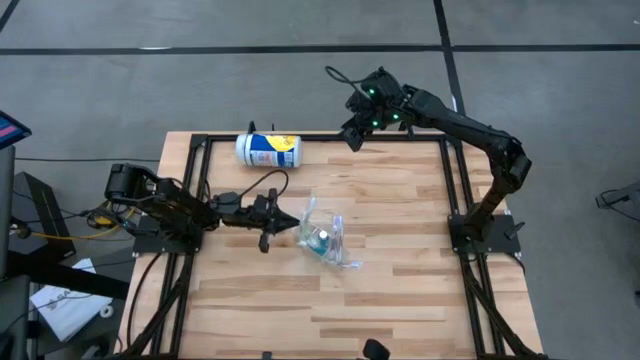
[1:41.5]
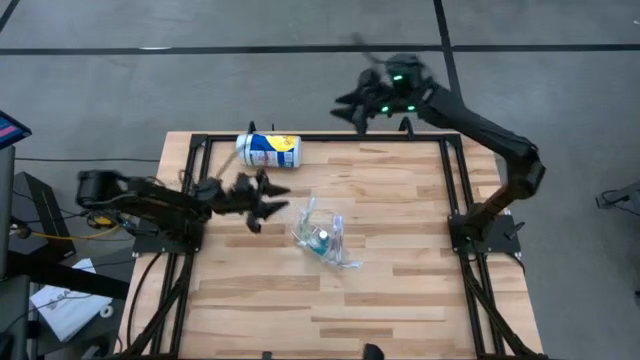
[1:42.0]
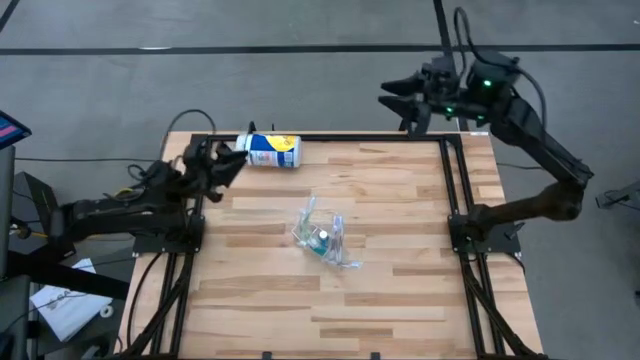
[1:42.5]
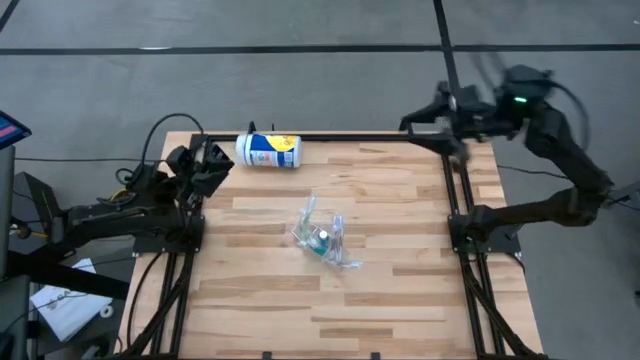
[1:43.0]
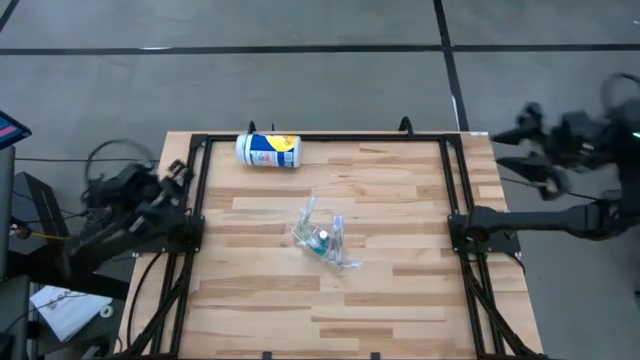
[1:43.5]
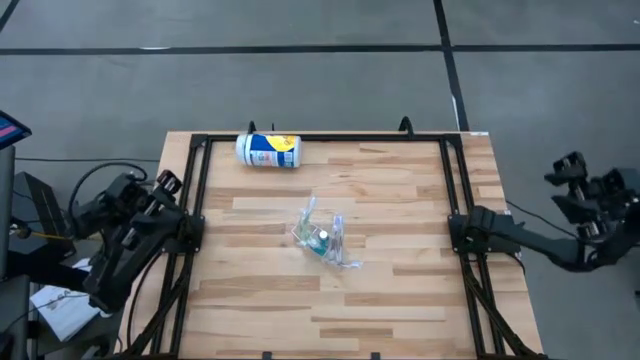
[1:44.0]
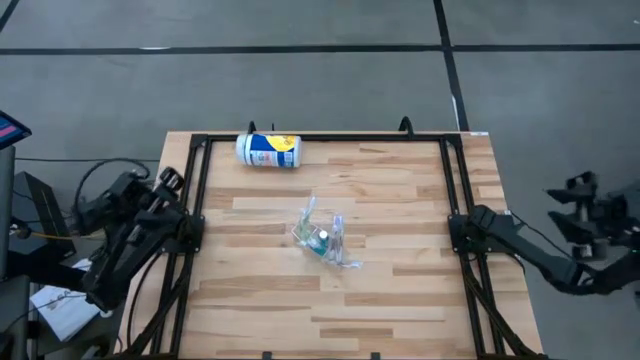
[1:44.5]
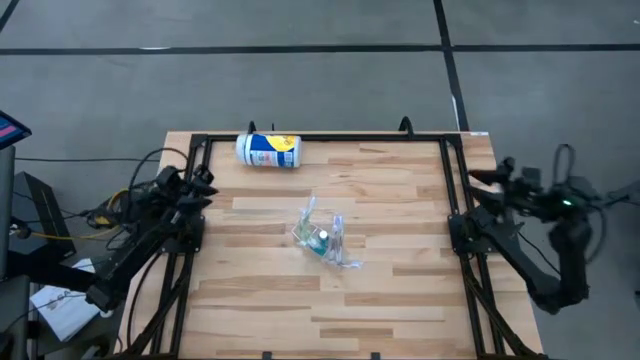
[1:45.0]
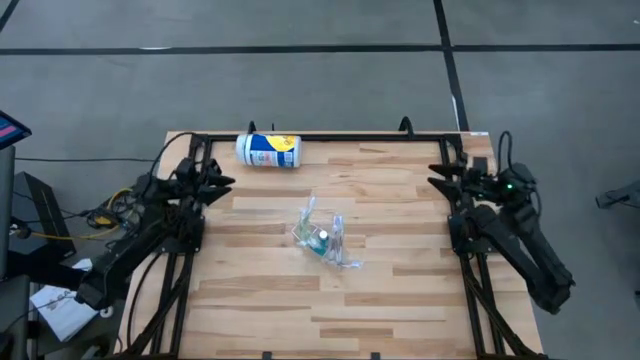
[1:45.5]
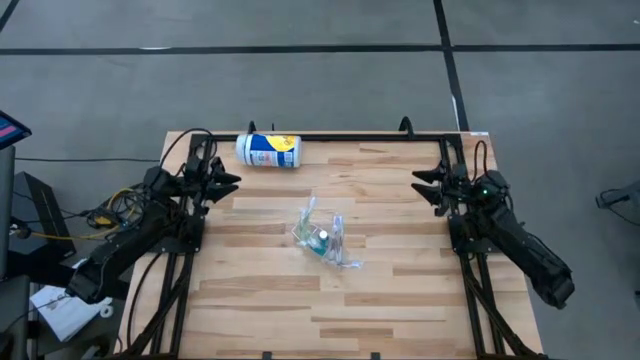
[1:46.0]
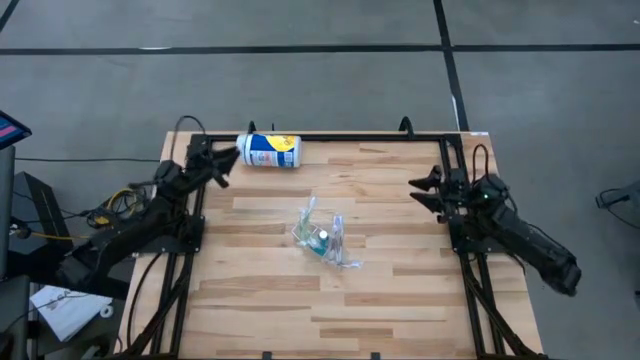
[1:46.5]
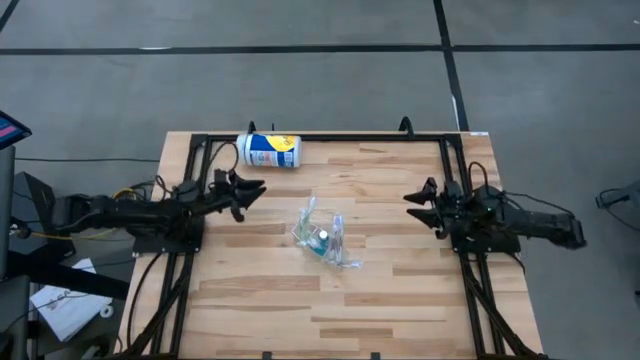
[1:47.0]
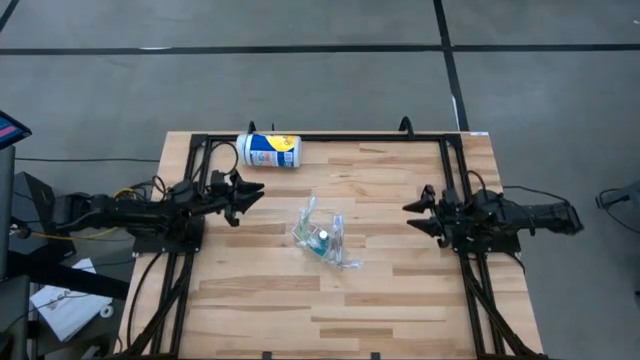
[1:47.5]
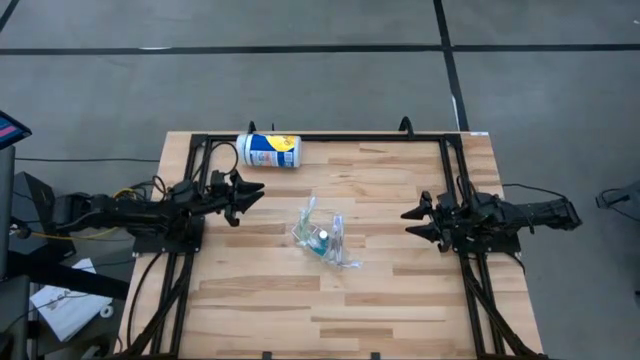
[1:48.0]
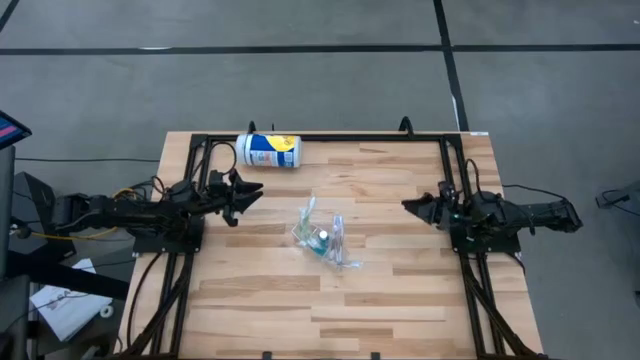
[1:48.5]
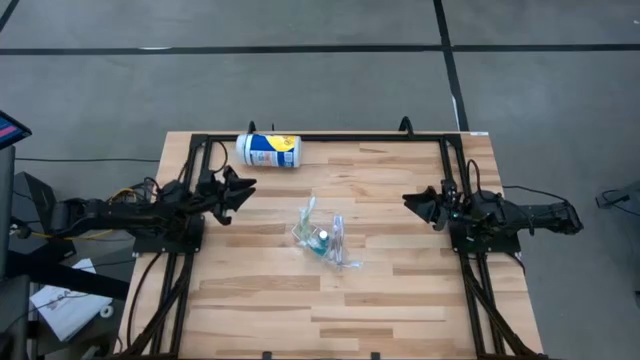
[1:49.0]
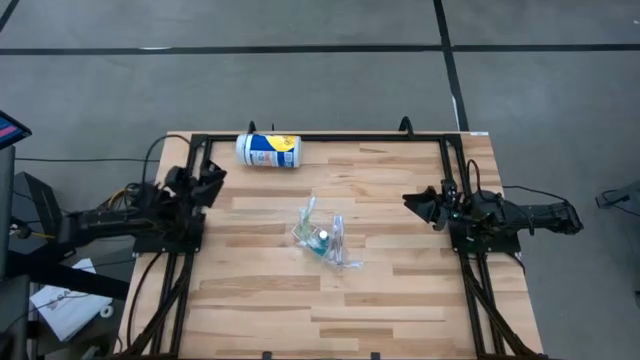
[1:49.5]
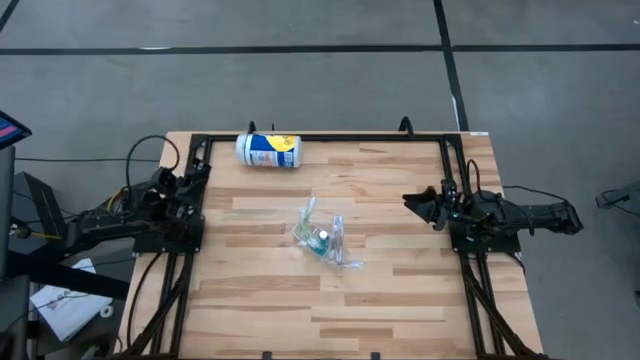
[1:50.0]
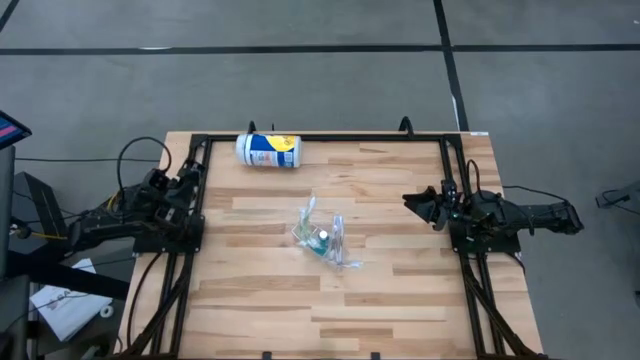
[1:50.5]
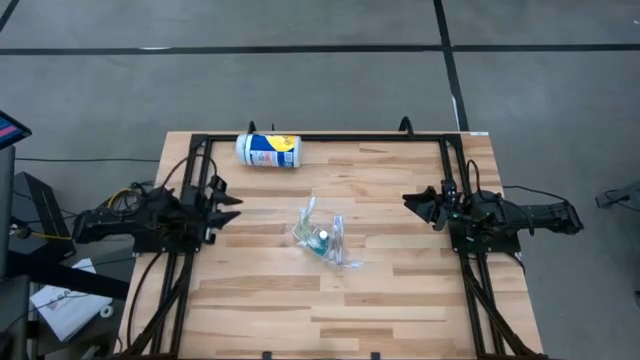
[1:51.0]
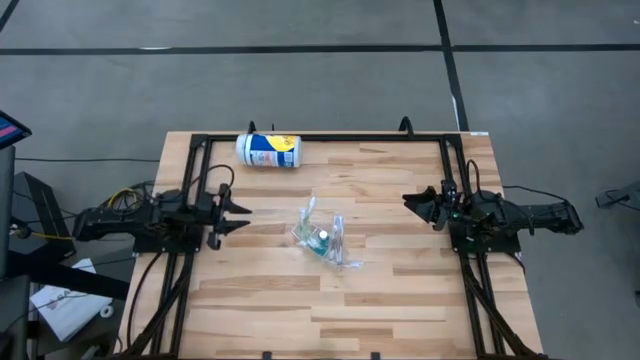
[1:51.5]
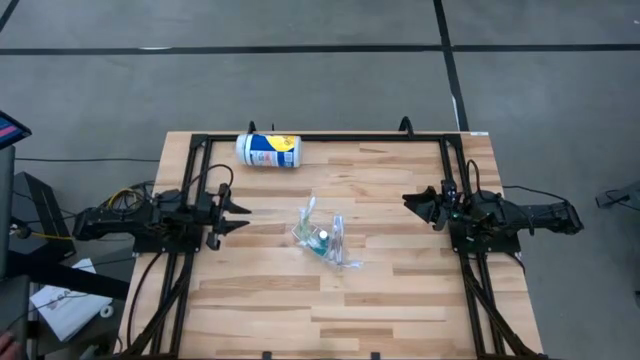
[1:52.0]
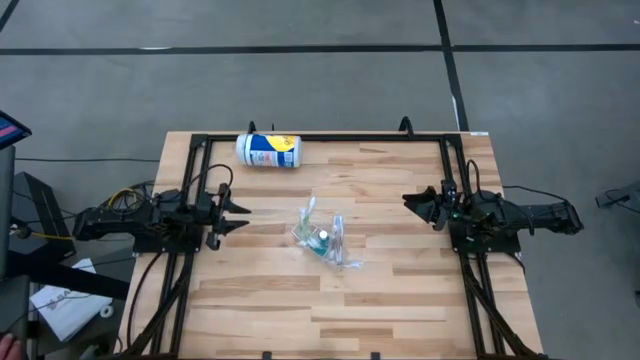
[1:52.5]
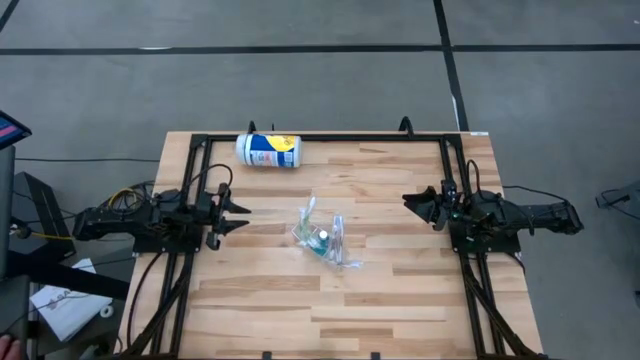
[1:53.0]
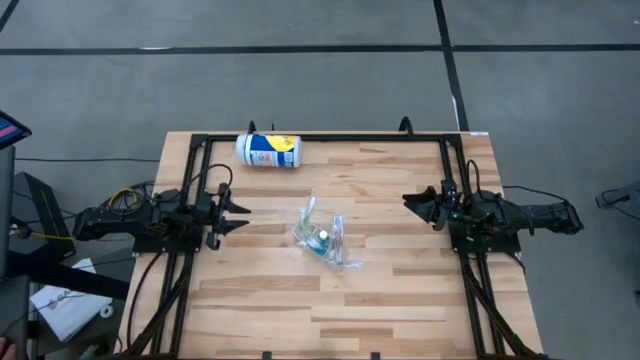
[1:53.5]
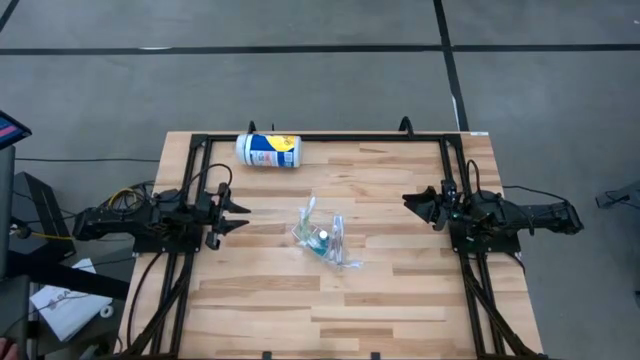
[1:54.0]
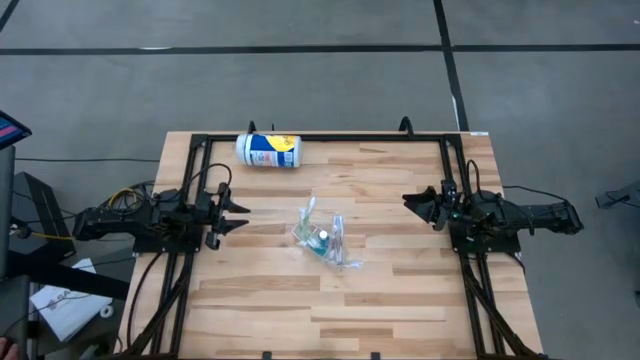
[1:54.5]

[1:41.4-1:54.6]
Task: Pick & Place toothbrushing station
Return to Home Position

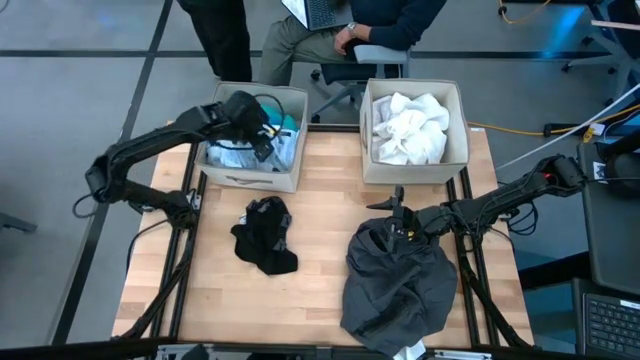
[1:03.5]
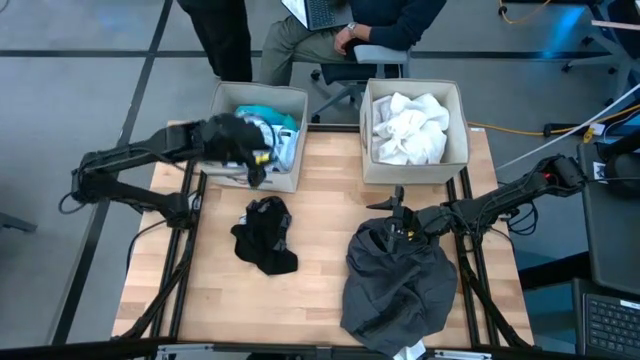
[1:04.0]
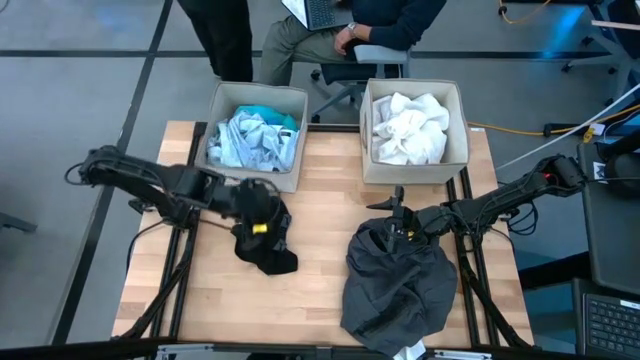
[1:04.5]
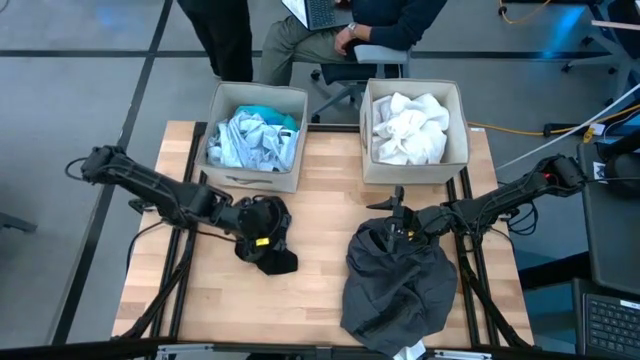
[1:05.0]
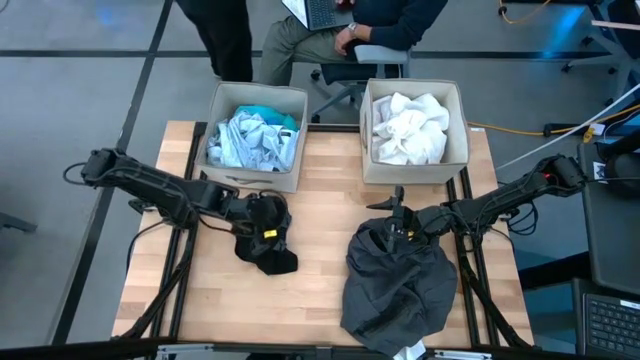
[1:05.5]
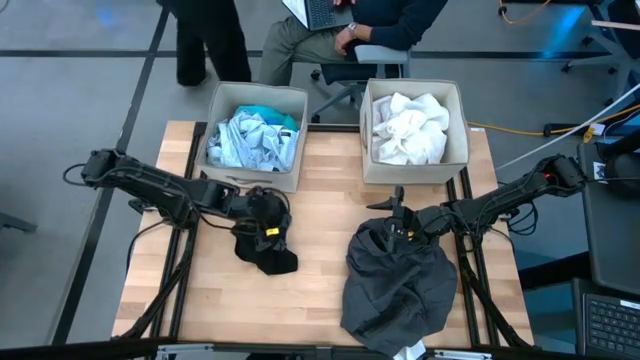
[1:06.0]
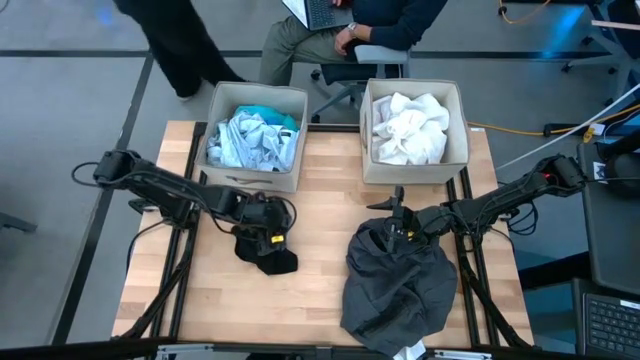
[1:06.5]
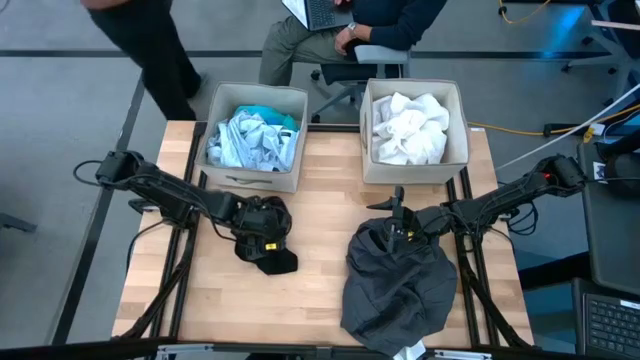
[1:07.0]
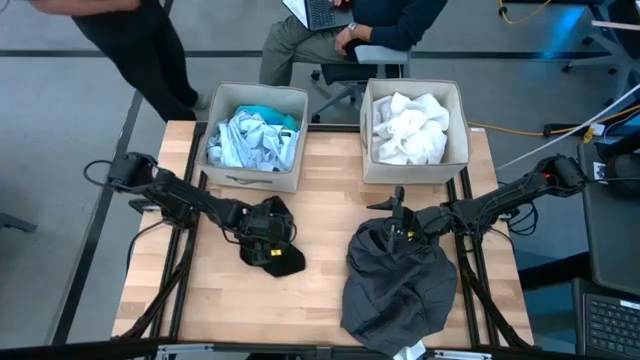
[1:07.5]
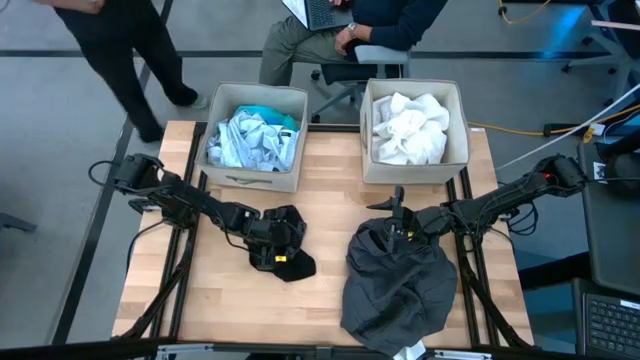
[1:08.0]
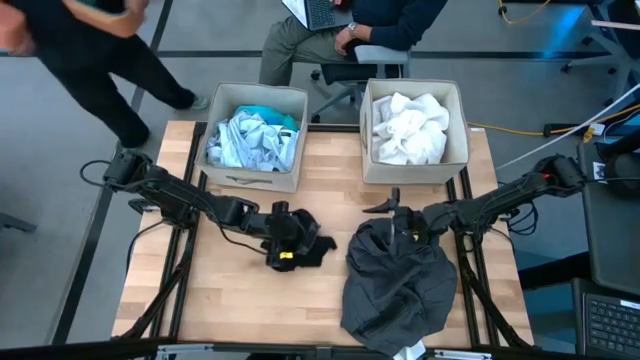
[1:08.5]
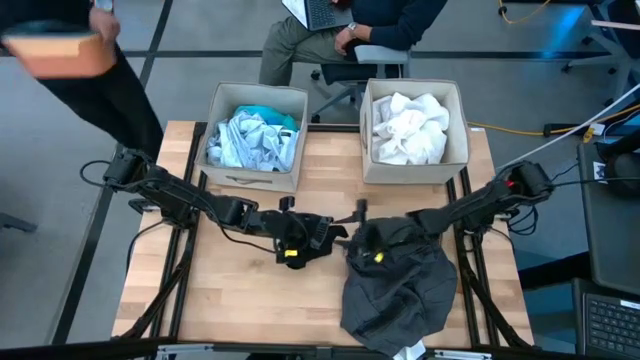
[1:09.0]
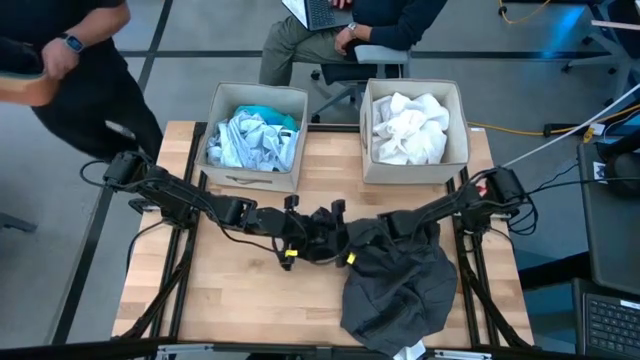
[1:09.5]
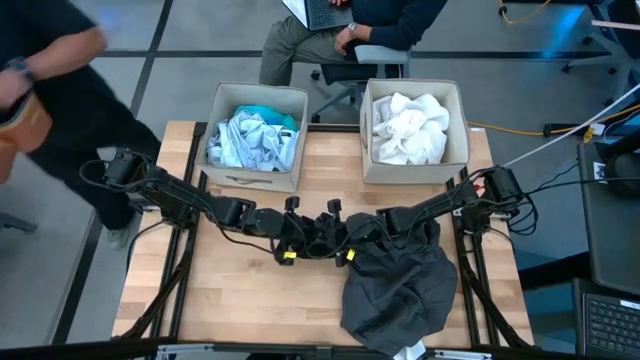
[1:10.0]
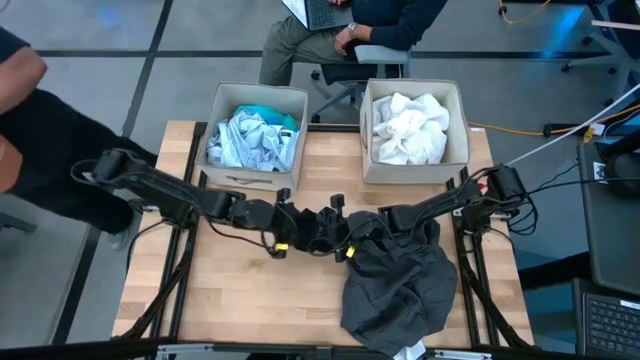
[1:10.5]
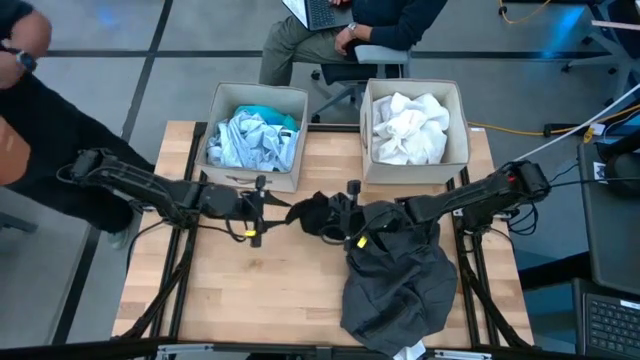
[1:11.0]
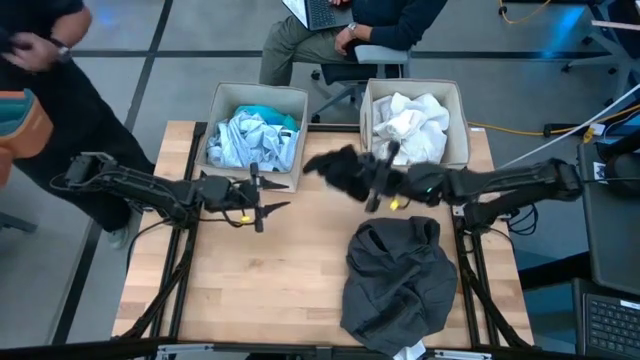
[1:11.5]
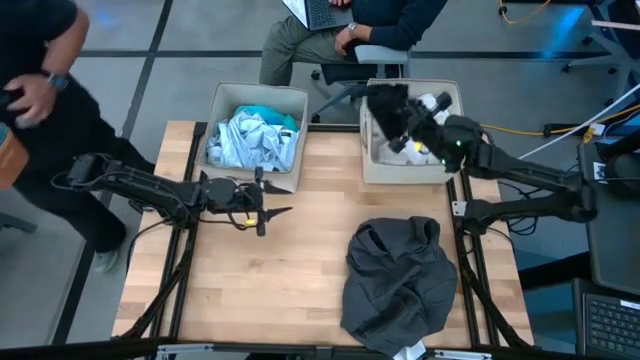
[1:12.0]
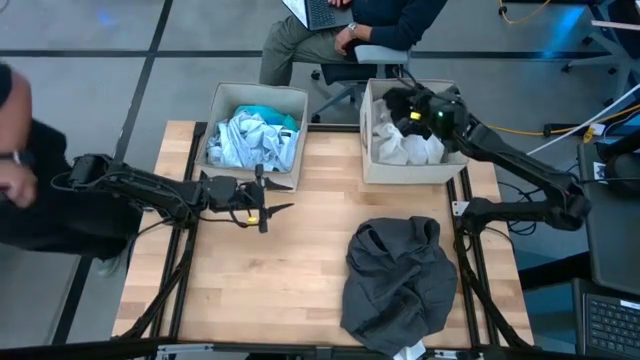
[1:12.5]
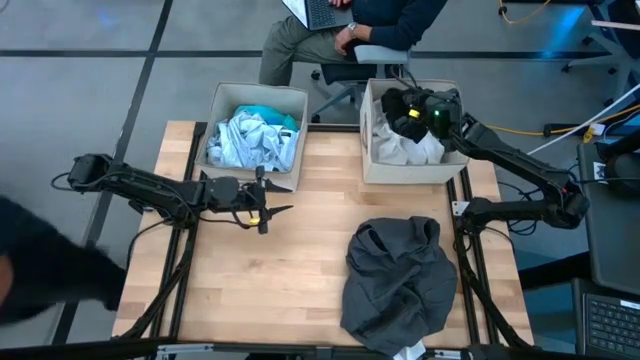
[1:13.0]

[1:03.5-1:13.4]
Task: Sort clothes
Put the black boxers into the right laundry organizer
